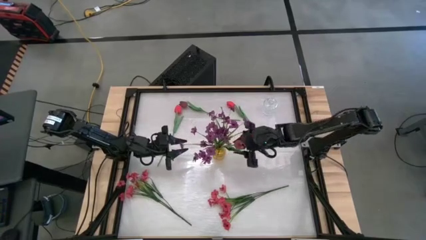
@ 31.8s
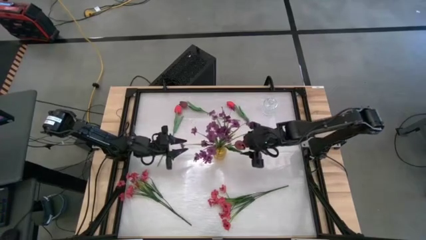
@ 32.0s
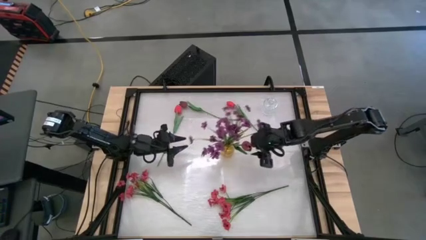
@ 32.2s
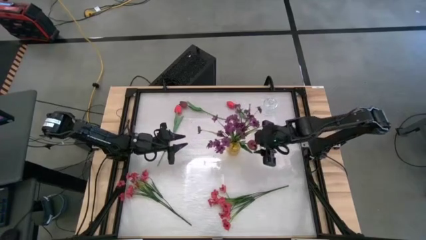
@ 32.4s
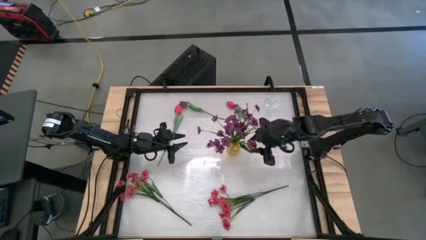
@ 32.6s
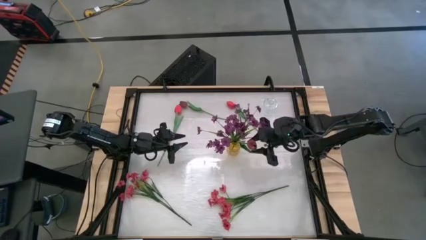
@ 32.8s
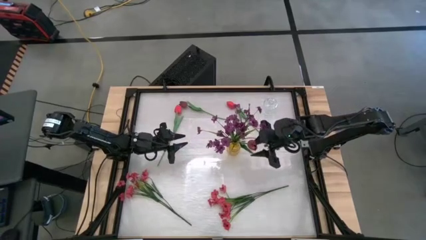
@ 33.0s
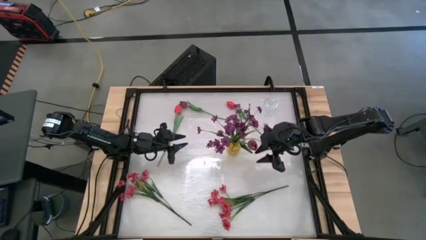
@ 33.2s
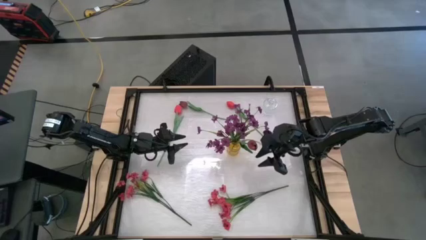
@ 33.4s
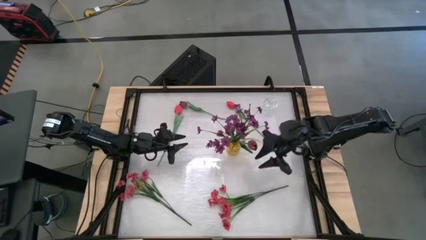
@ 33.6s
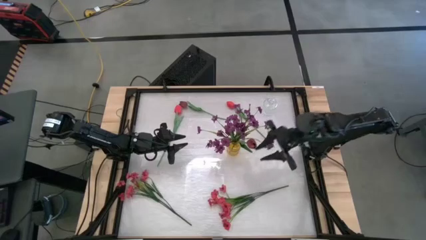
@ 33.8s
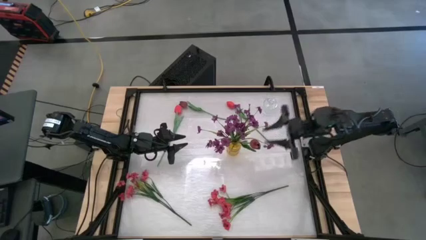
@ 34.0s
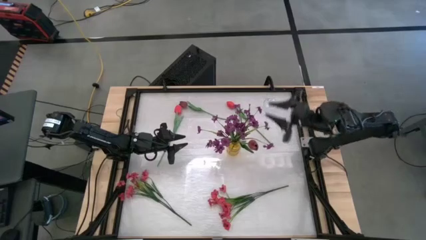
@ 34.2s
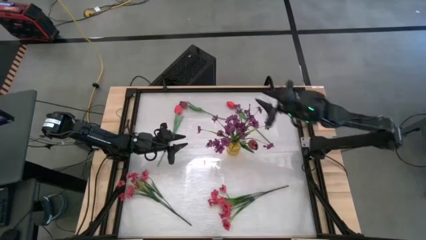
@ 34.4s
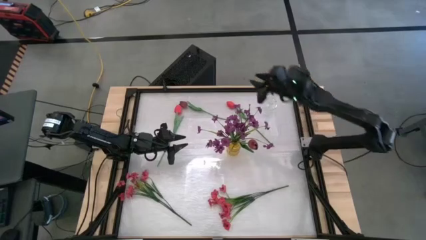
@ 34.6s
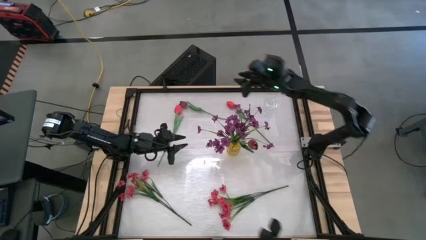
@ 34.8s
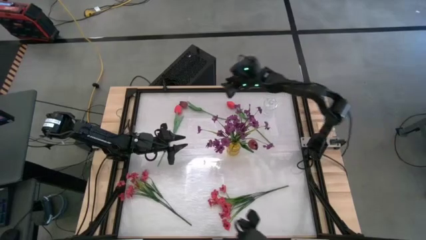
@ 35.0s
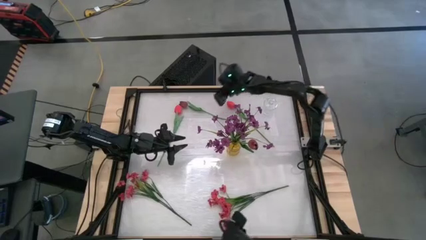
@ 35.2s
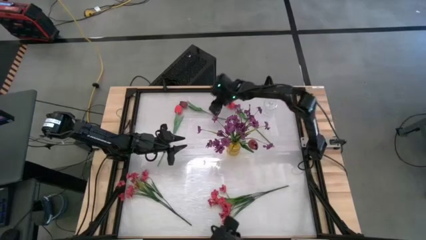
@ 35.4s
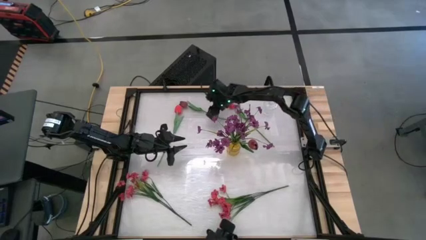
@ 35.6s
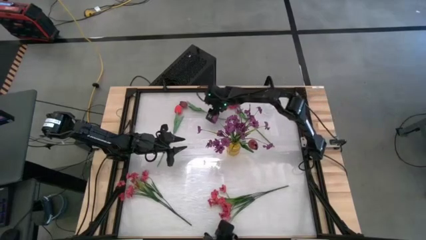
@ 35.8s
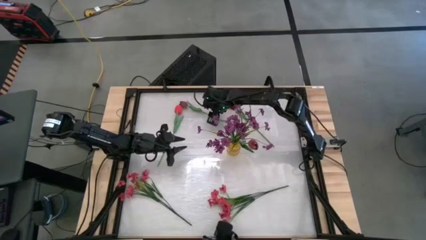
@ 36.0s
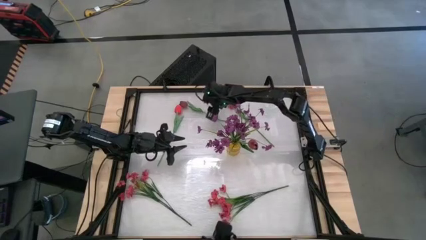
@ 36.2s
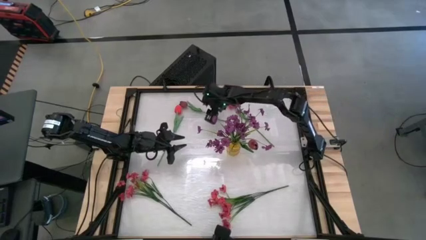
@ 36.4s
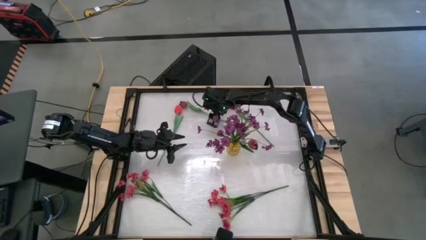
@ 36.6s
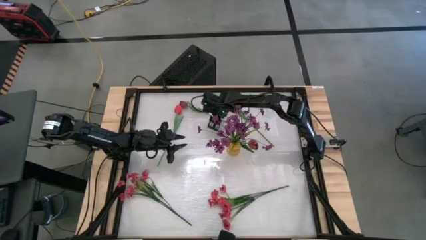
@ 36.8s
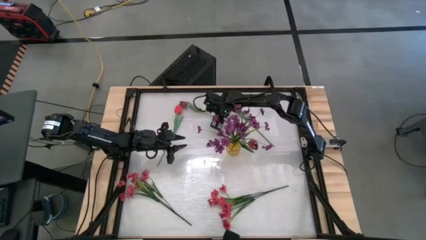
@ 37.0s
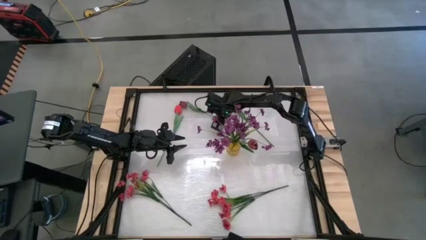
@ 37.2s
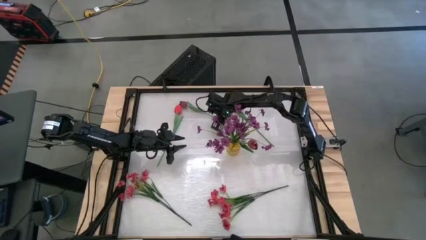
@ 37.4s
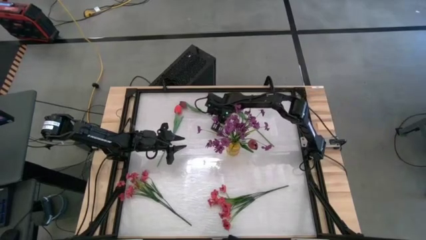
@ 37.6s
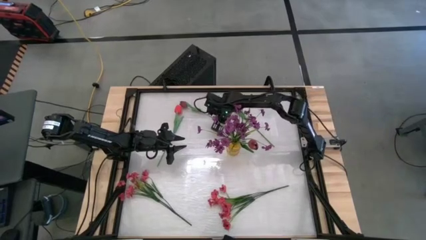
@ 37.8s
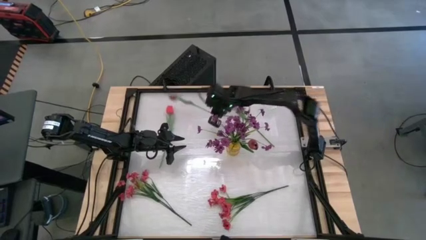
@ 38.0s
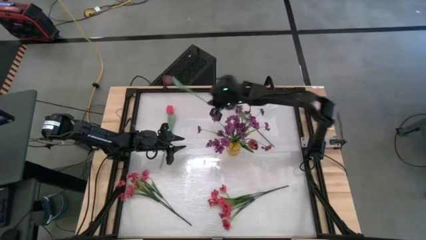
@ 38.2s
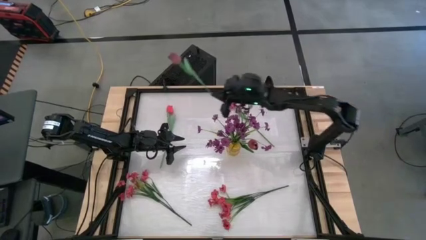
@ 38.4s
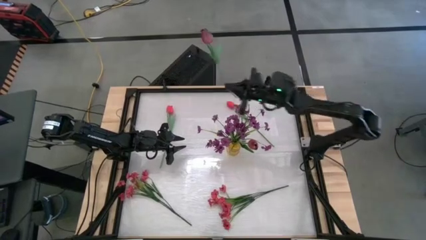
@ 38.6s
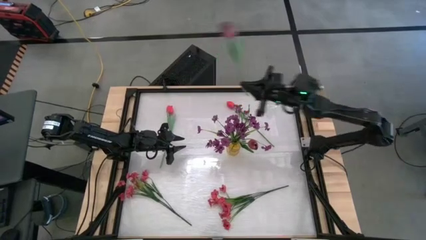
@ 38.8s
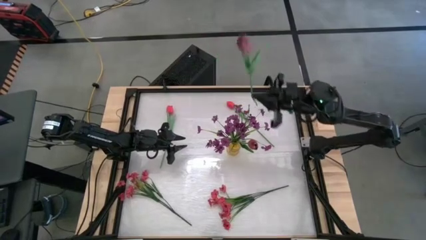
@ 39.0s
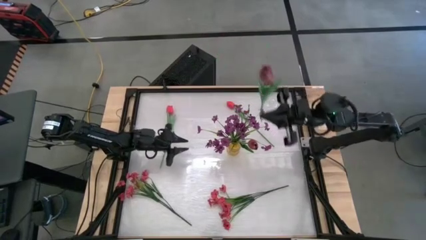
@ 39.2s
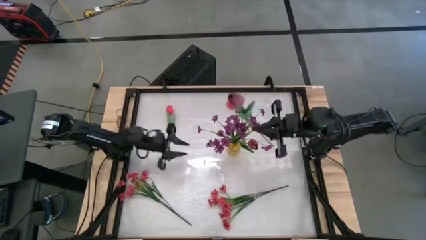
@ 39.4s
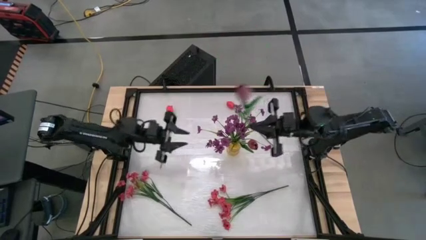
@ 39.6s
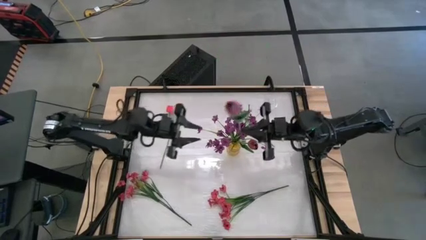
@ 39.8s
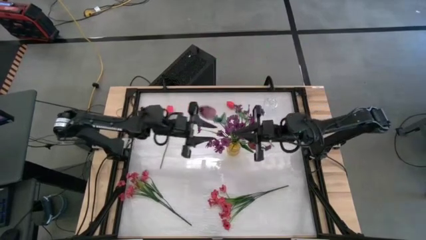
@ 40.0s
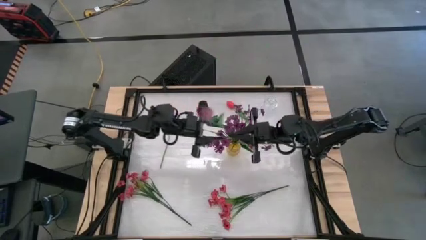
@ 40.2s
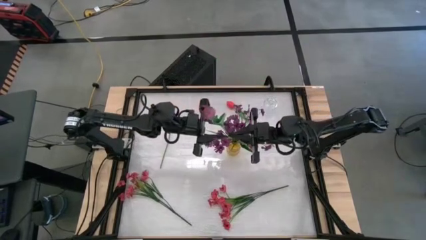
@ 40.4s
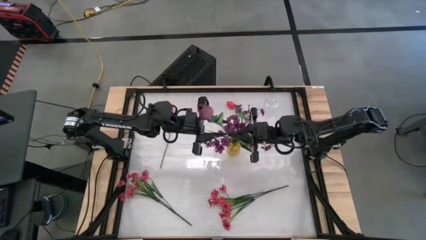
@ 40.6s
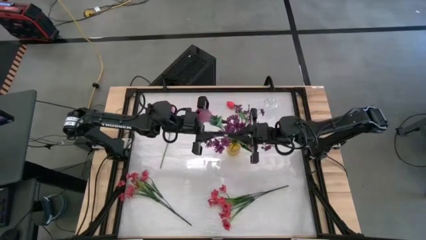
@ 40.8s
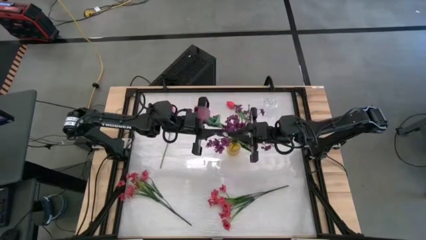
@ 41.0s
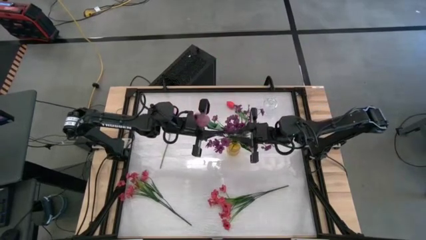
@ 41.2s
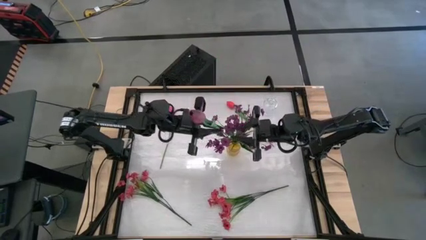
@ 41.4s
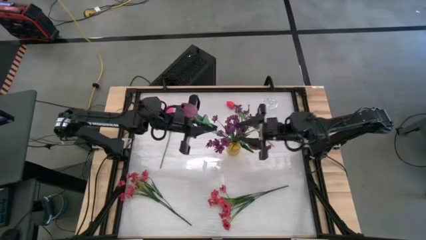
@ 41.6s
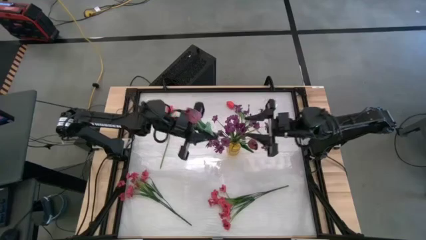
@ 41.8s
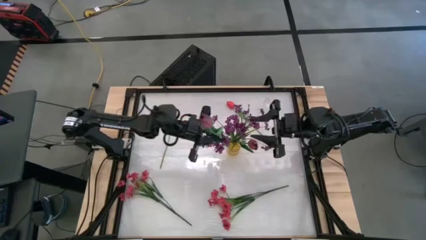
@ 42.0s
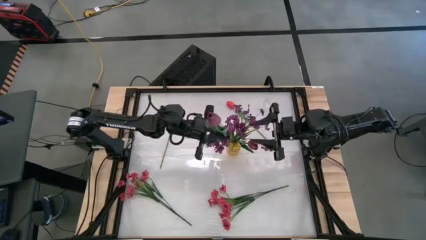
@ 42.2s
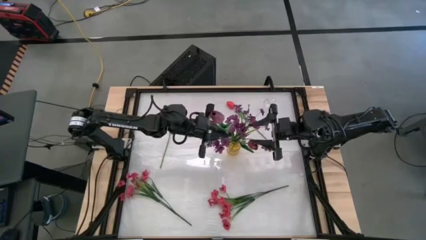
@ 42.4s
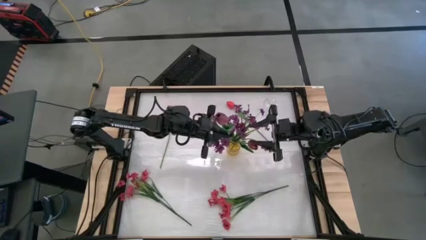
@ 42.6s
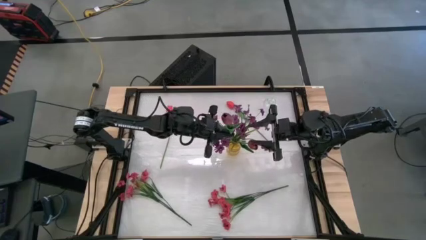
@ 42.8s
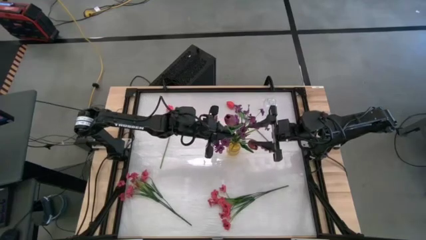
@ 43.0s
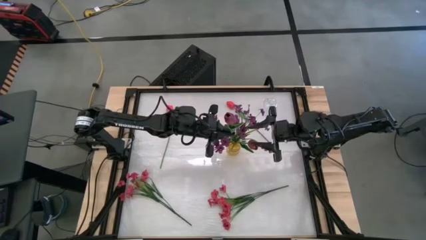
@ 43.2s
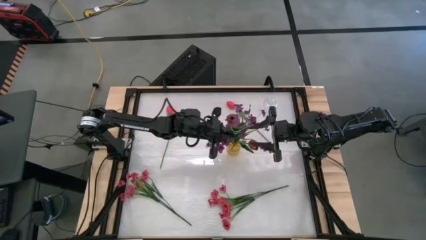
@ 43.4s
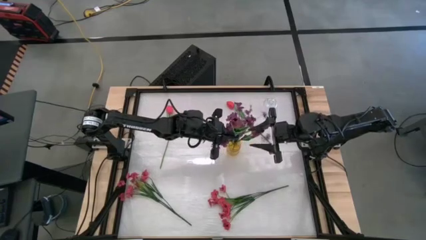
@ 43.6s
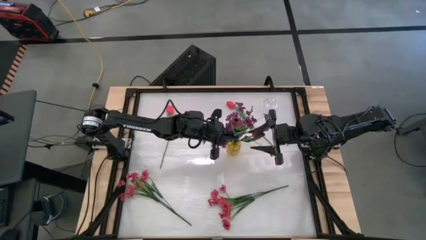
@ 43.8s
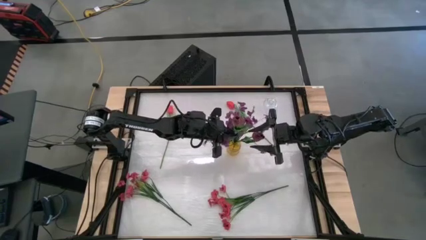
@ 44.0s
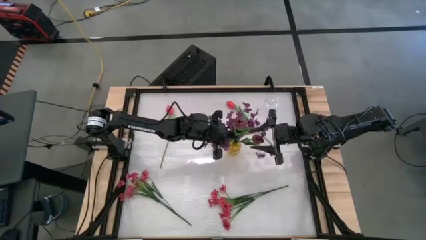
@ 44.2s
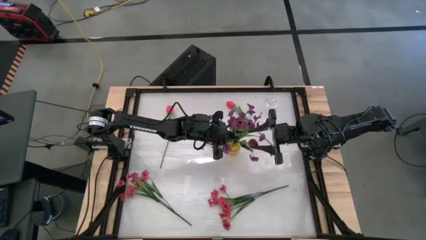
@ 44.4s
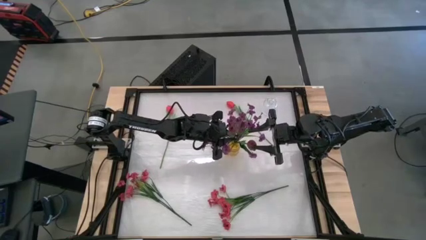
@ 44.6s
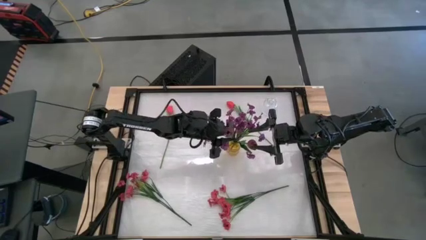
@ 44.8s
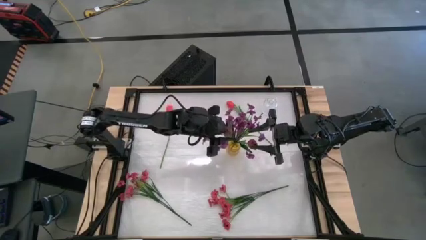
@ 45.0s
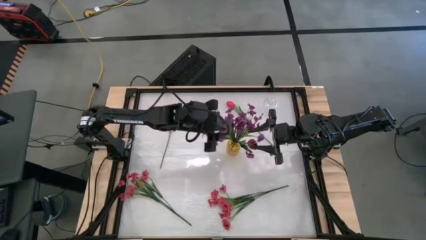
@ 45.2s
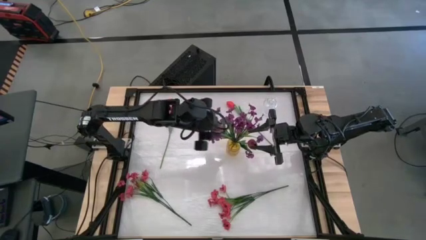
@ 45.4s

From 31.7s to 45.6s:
Task: Sort flowers into vase by color
Put the purple tulip into the yellow vase

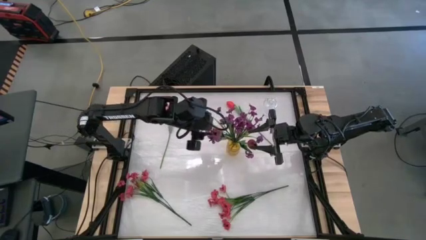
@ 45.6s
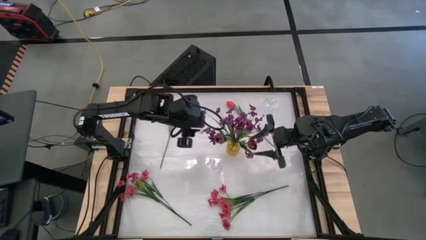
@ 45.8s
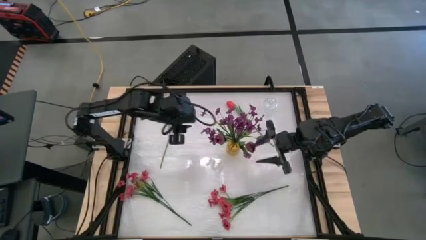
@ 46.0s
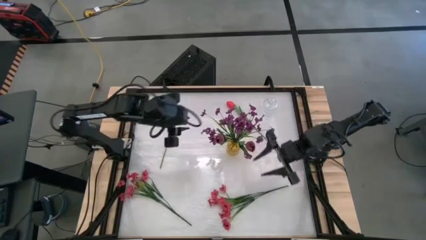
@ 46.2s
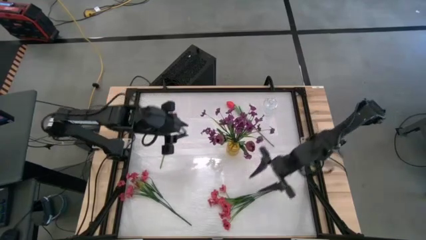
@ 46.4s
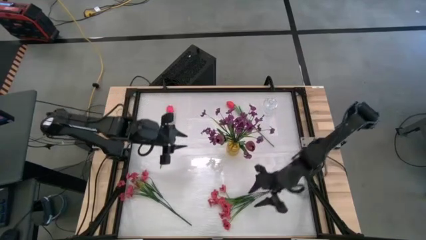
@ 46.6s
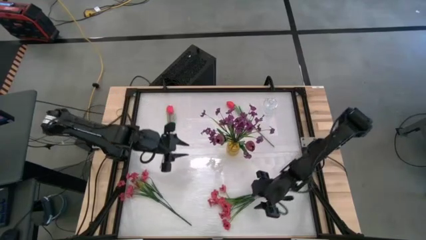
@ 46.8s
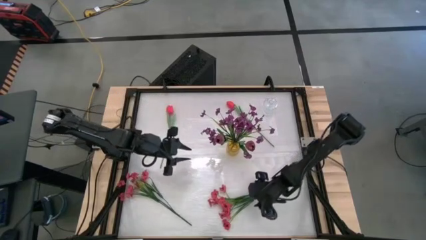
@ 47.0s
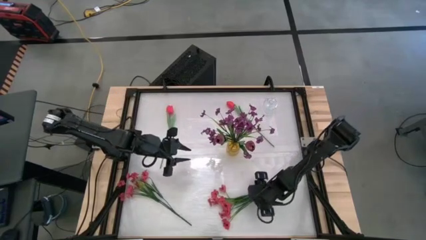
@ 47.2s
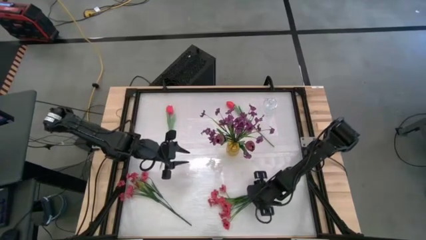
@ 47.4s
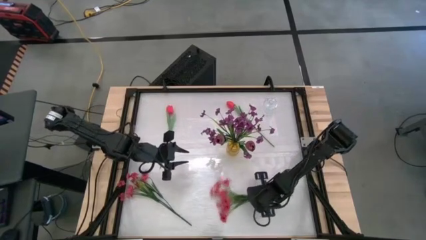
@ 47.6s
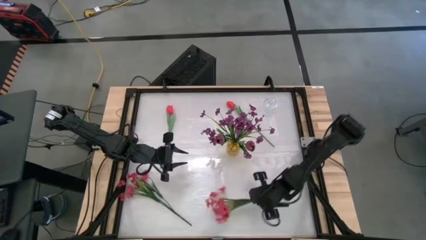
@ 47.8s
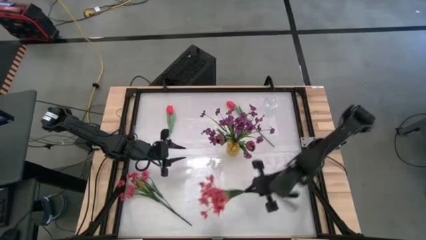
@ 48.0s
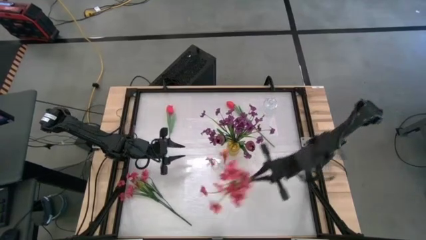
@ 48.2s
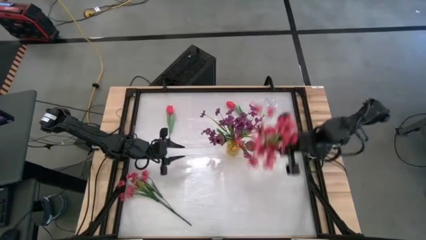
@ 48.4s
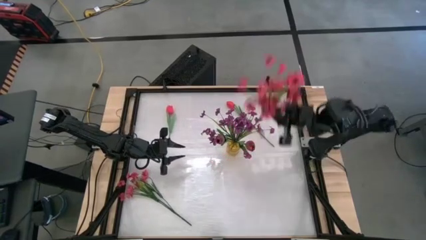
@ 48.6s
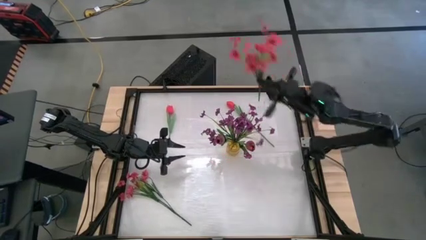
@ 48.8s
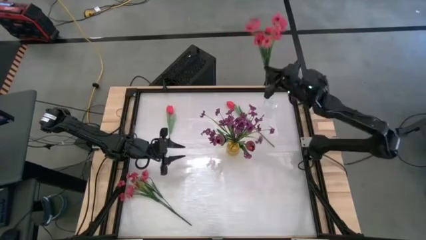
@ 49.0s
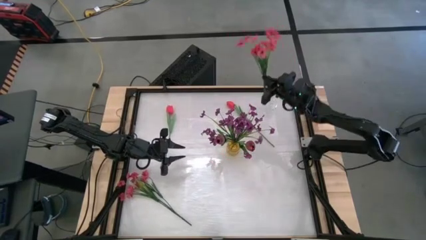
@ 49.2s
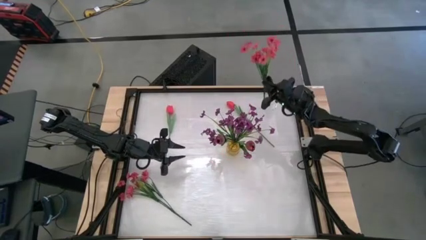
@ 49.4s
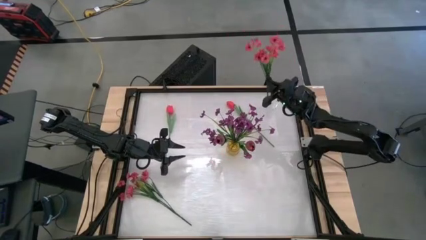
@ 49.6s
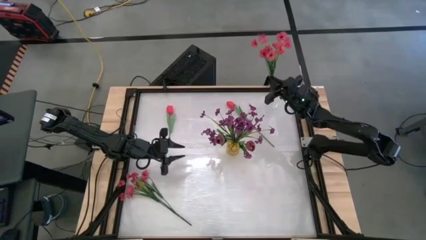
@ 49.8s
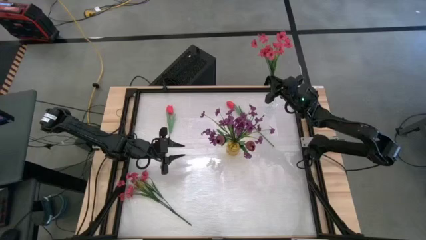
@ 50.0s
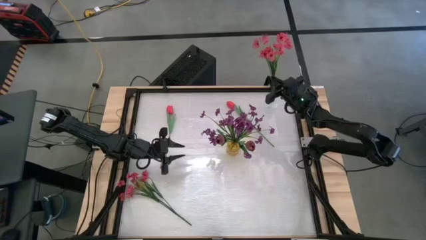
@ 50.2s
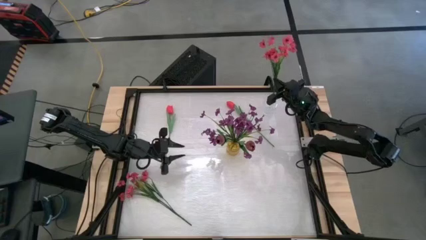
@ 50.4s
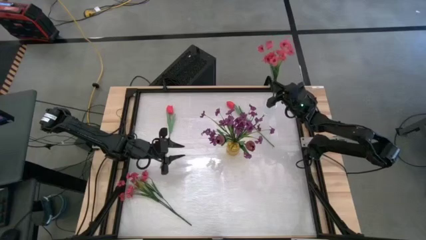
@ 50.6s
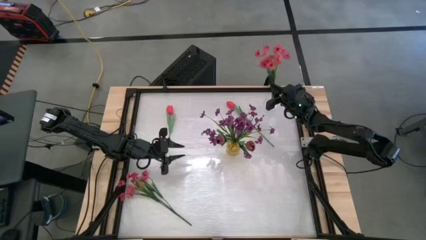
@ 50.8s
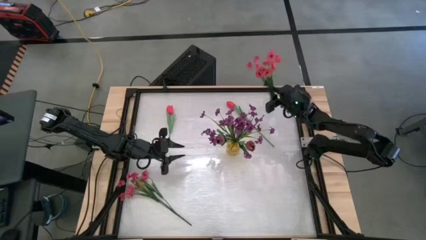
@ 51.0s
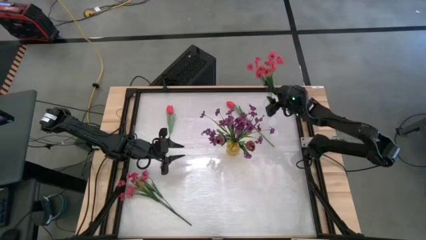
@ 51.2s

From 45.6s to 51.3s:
Put the right pink flowers into the transparent vase
